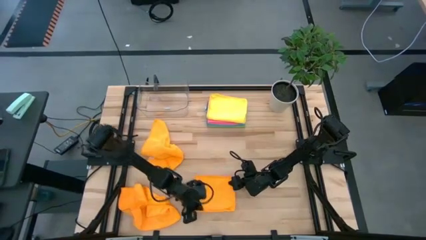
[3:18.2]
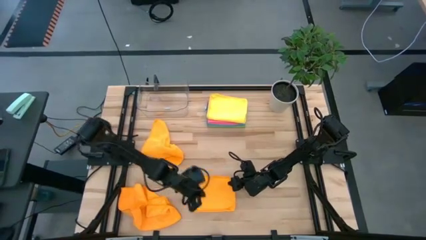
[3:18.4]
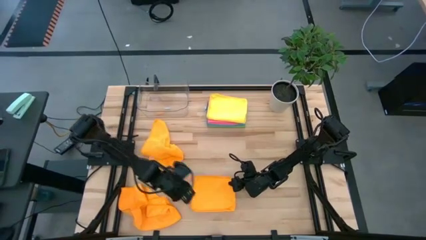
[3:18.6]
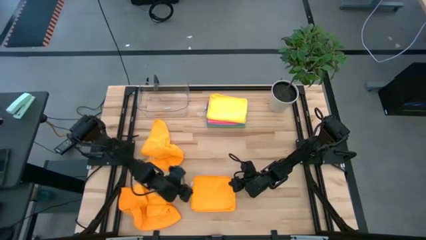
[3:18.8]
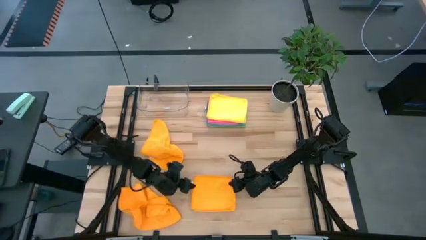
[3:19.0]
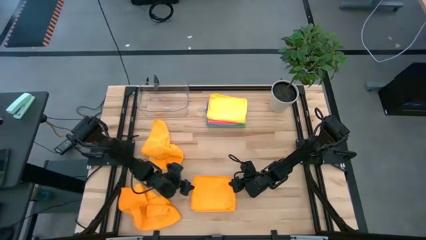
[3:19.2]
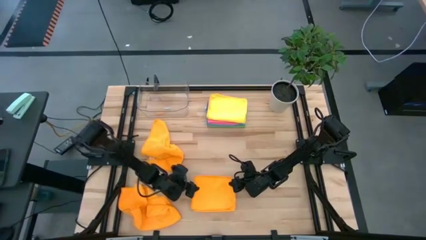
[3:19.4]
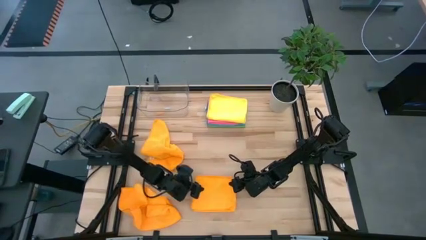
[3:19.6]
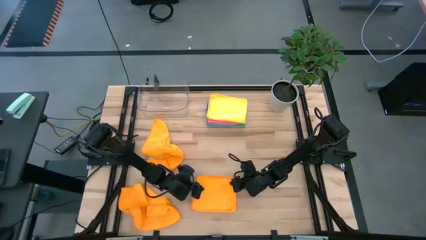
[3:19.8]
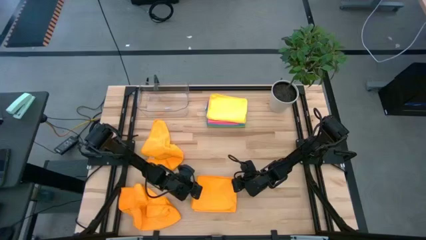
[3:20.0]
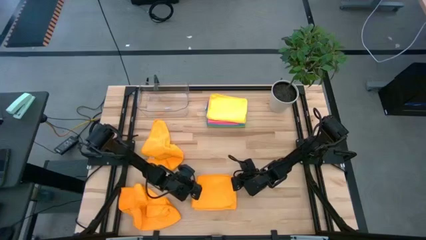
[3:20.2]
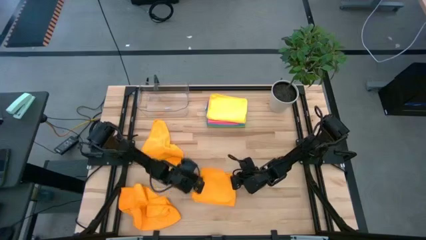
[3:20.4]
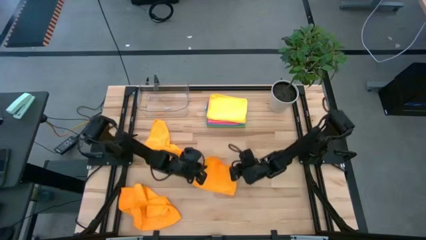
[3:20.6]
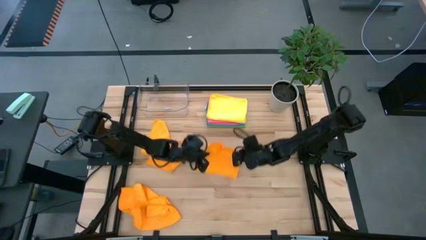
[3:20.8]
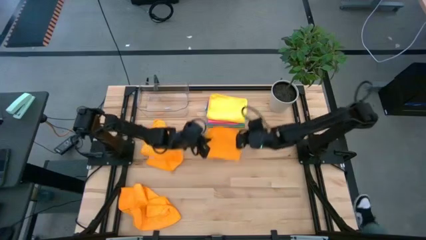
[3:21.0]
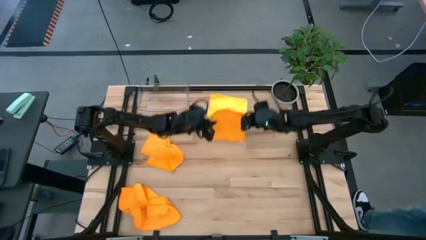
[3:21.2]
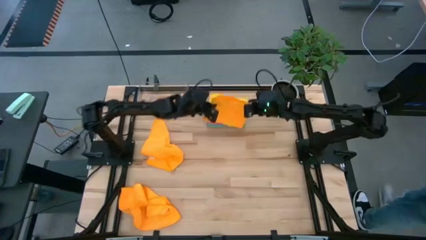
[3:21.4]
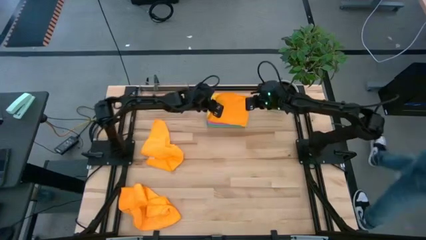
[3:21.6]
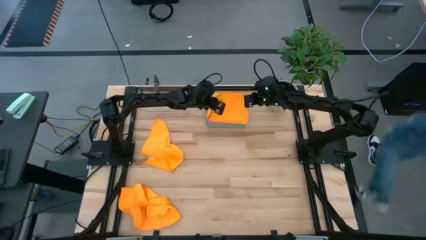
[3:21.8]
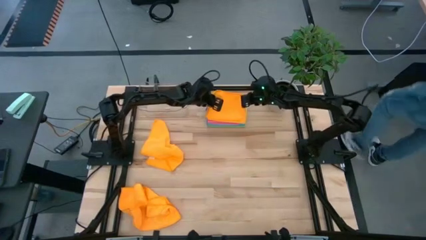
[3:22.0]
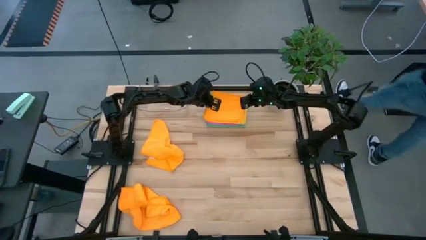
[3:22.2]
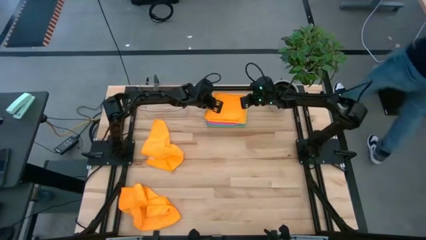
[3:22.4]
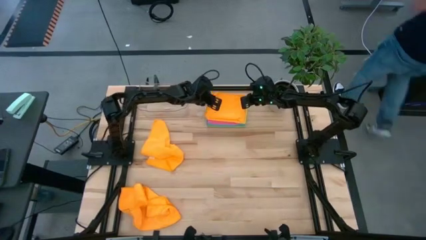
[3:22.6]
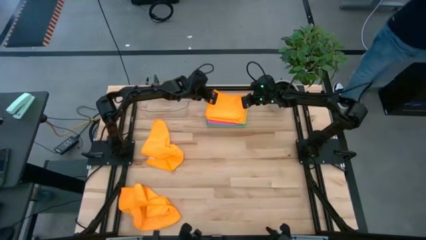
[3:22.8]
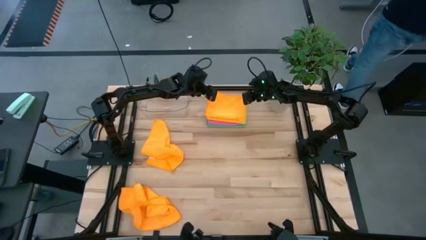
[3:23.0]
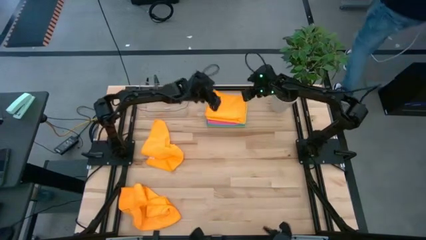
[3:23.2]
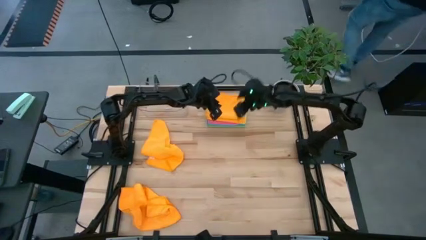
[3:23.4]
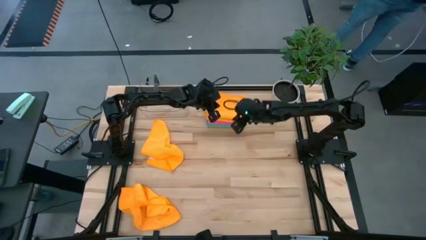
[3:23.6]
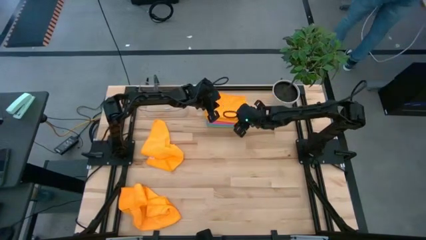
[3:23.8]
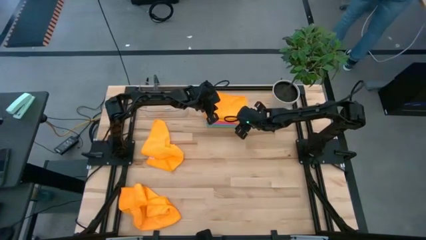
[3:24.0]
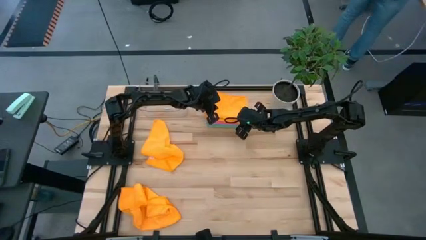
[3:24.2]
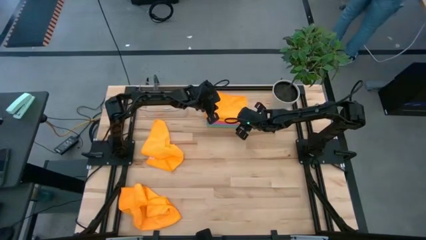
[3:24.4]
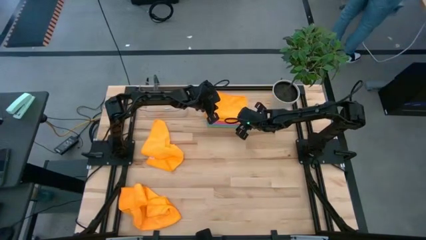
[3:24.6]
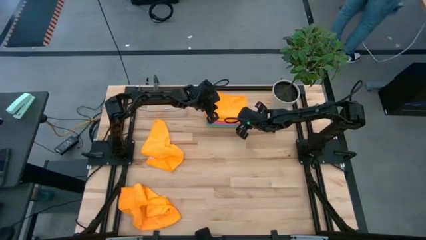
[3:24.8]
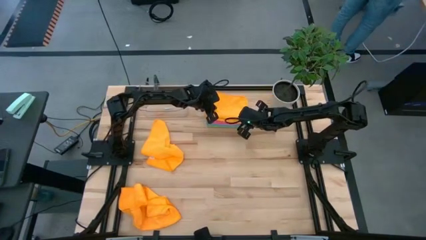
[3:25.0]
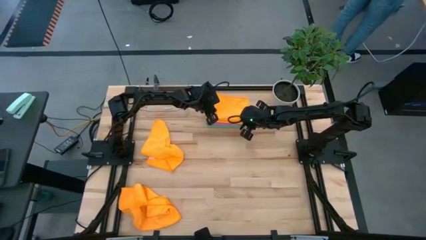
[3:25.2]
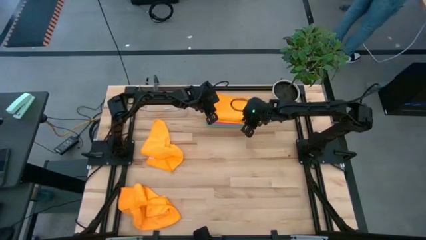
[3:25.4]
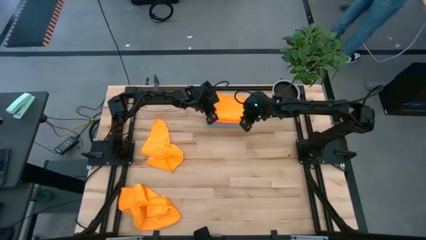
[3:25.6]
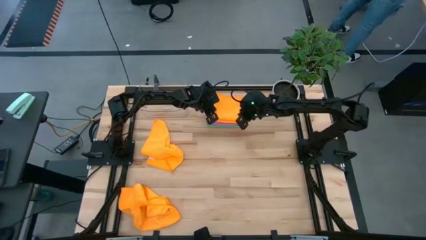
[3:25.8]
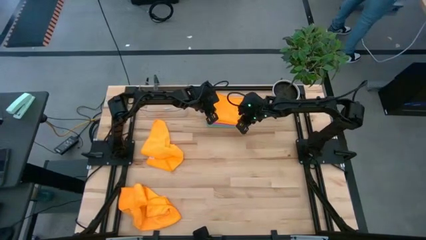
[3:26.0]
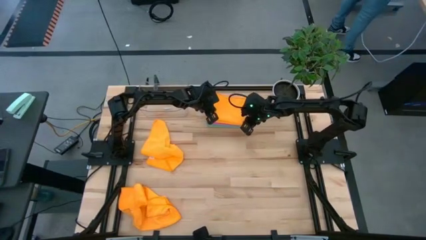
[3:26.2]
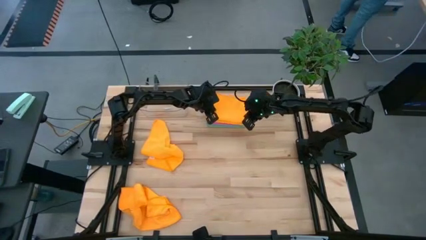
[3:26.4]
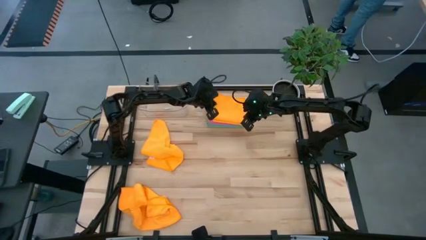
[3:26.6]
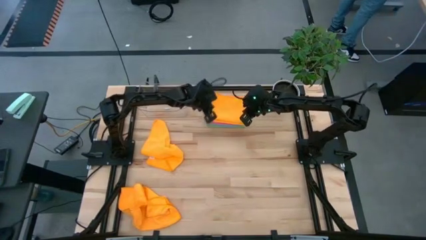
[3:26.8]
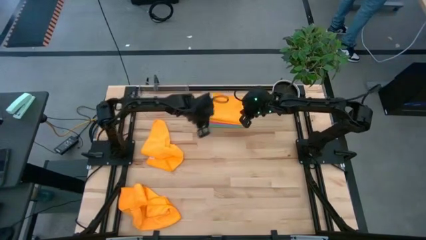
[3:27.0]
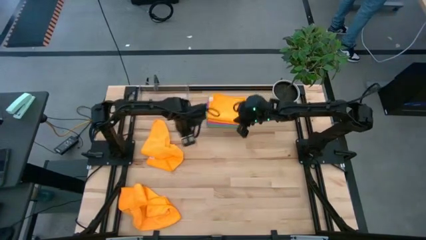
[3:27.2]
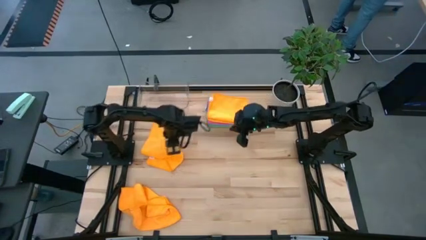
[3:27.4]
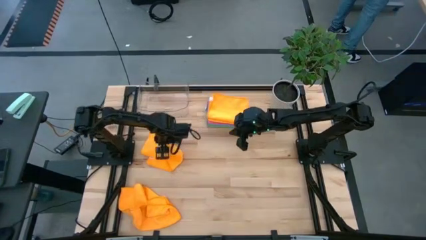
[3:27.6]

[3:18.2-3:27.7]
Task: Fold microfiber towels
Stack the folded orange towel on the yellow towel

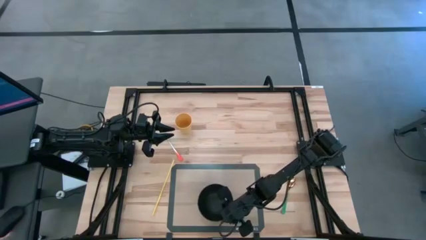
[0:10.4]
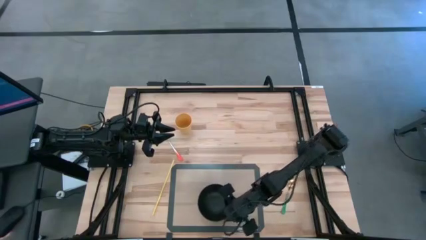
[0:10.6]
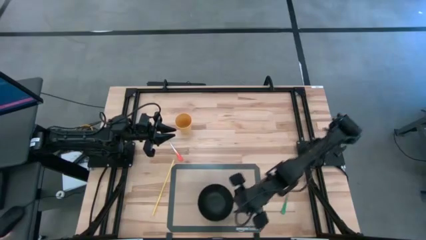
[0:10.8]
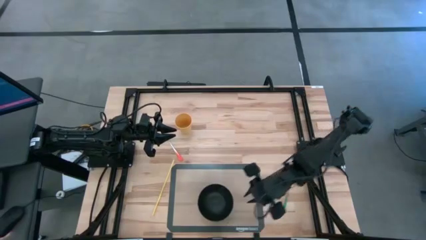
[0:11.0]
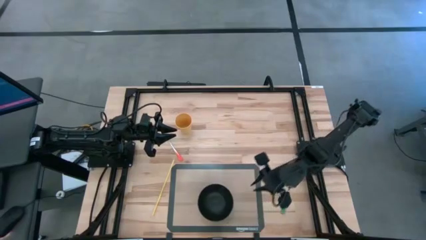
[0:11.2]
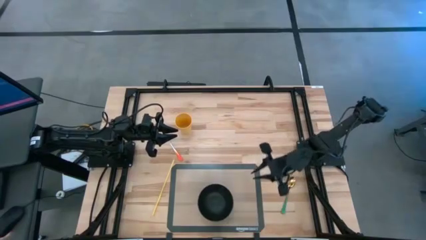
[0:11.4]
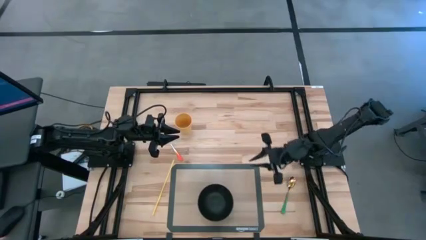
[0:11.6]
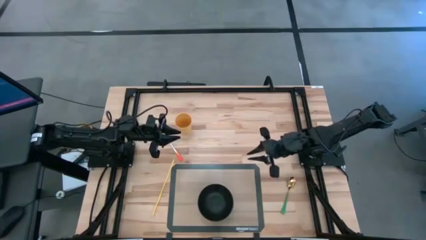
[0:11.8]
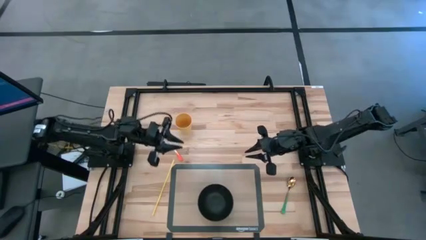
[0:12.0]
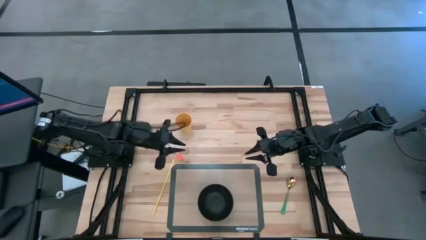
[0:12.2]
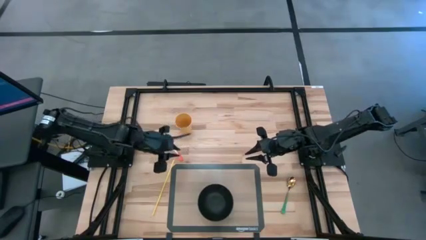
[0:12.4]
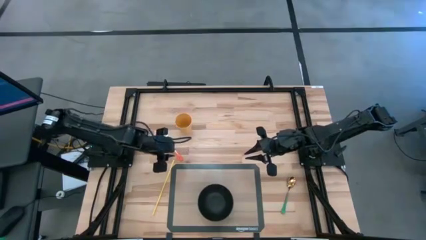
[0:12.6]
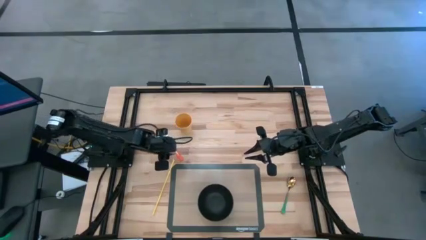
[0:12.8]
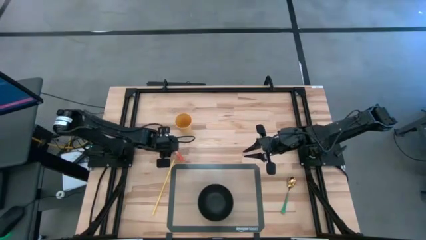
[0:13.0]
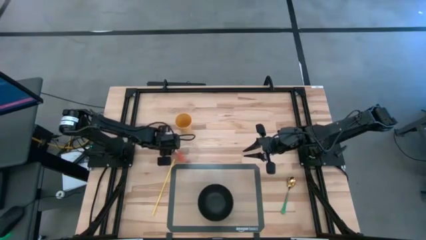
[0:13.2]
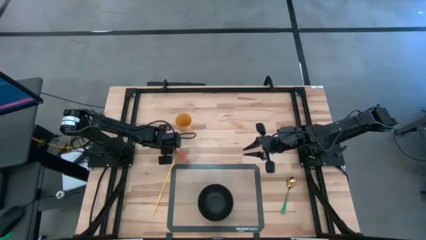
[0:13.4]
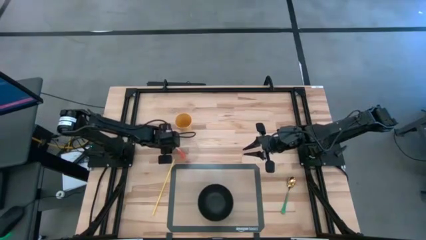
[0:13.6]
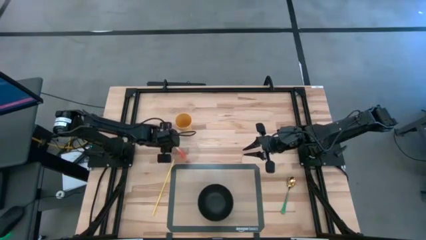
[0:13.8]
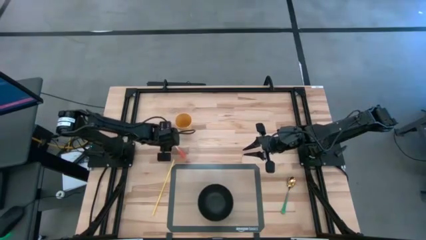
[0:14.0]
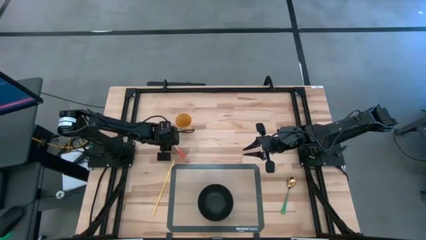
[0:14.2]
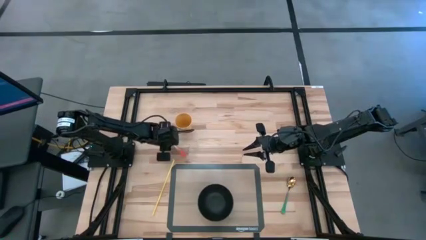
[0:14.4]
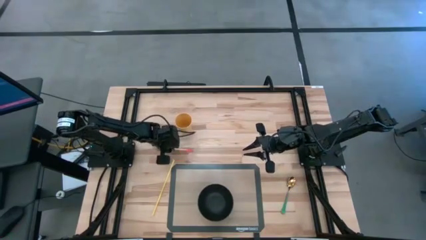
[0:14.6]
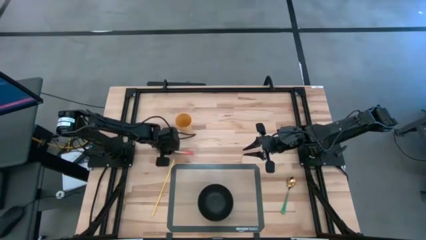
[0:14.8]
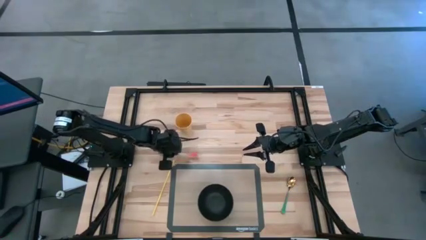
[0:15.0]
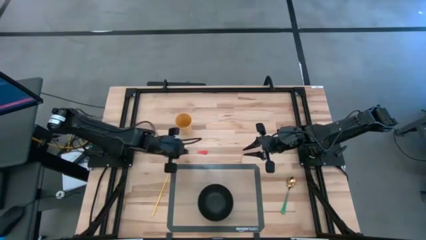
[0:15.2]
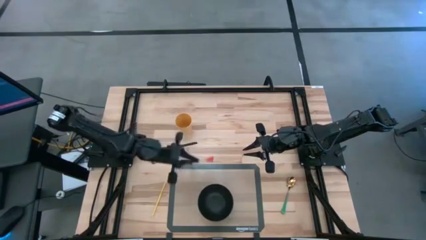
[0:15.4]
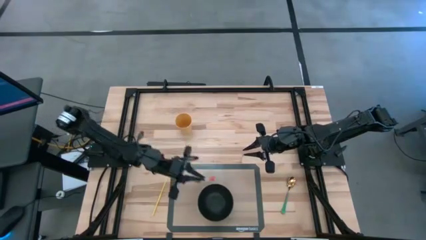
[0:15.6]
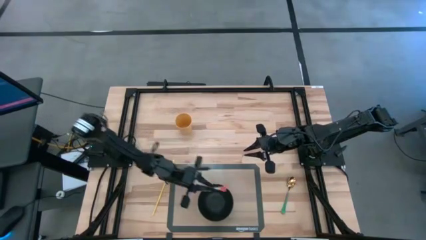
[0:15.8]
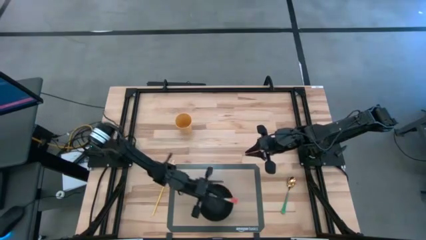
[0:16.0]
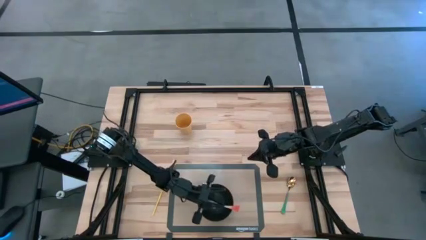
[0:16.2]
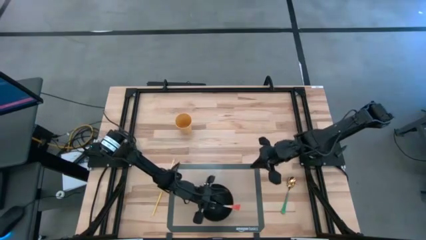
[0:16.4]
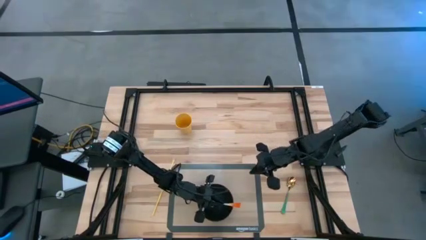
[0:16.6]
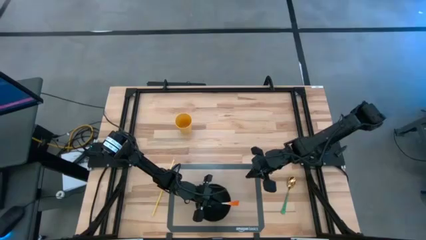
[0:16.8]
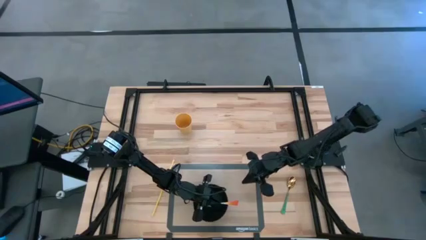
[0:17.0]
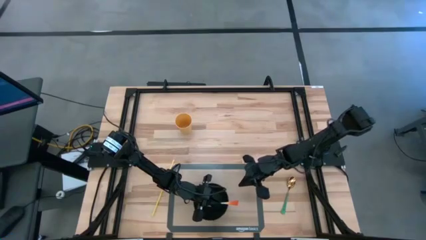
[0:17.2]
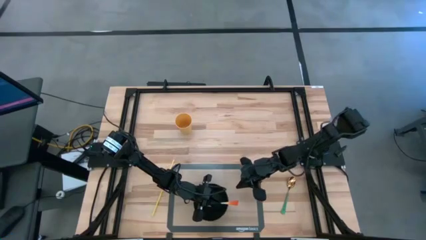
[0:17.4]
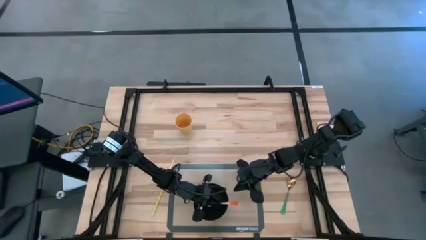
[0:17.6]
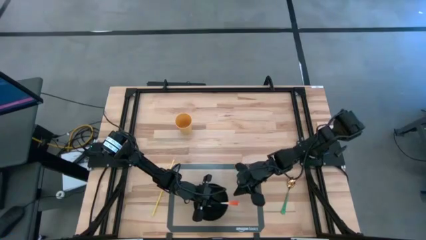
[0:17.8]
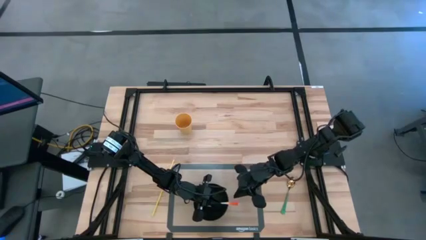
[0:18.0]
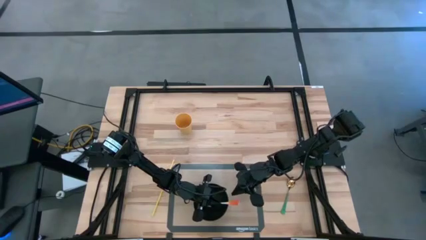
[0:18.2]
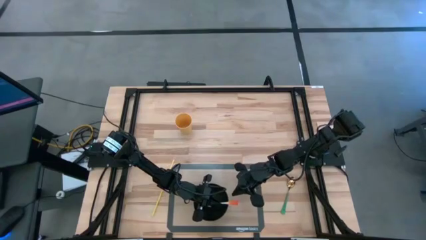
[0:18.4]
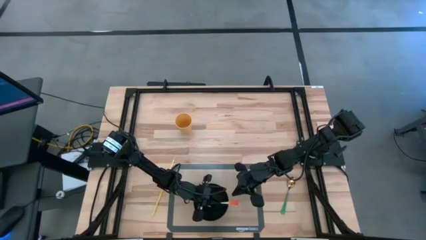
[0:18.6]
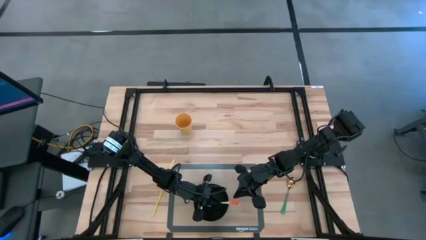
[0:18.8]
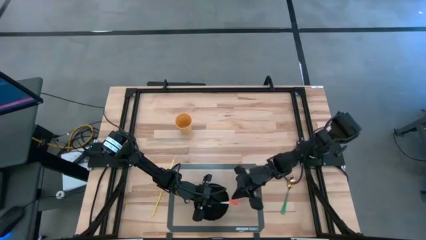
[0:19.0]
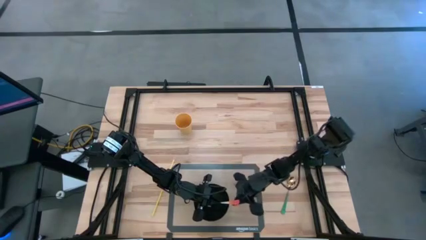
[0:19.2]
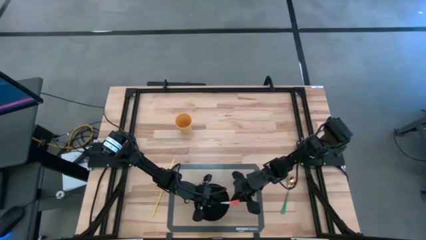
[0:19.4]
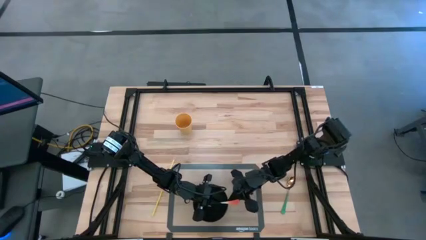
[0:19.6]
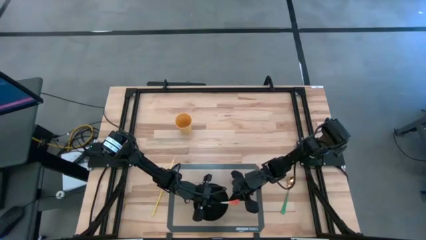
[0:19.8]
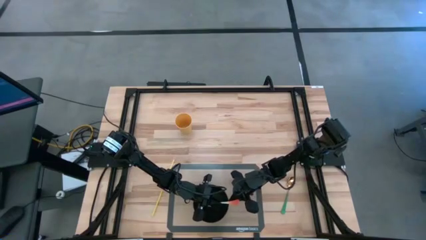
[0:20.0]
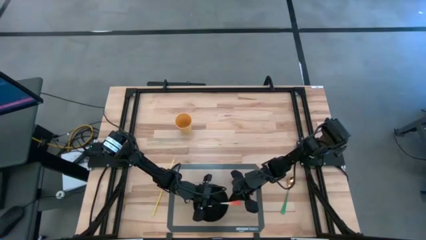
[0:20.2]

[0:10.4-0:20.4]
Task: Pick & Place Utensil
Put the white orange fork into the black bowl on the transparent mat
